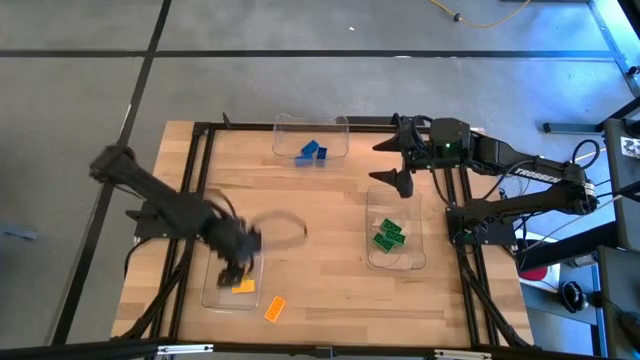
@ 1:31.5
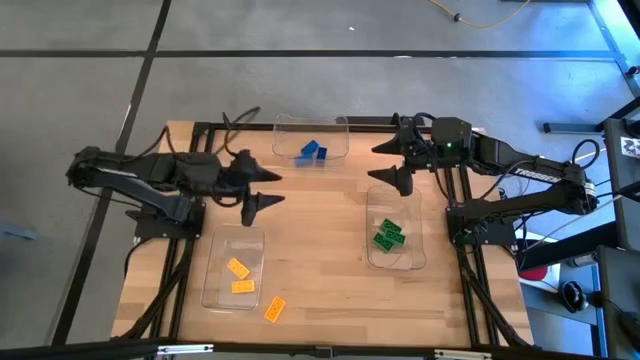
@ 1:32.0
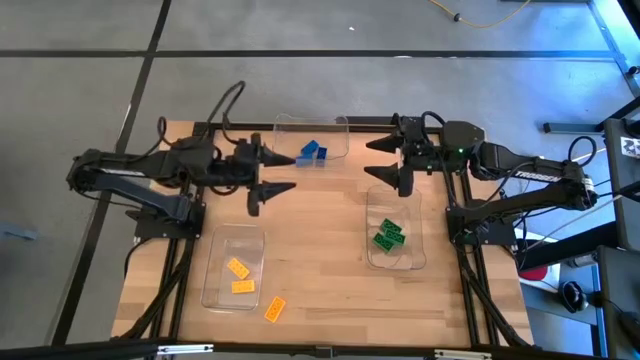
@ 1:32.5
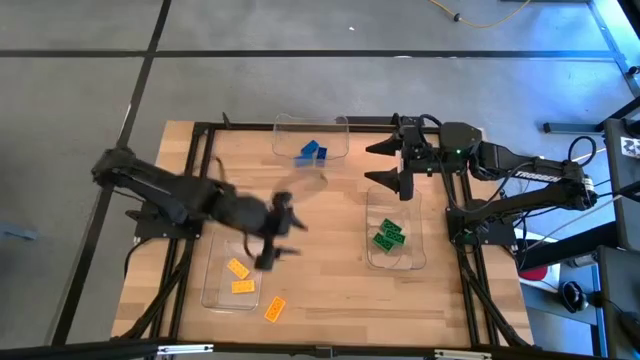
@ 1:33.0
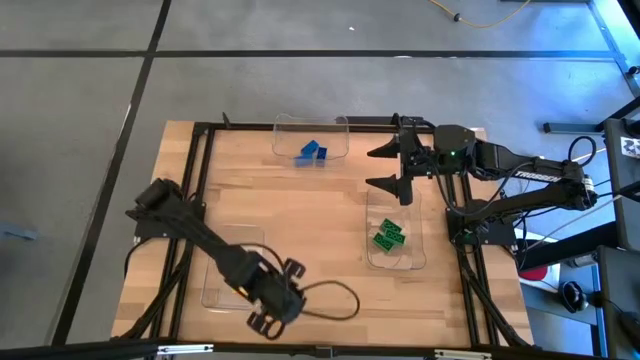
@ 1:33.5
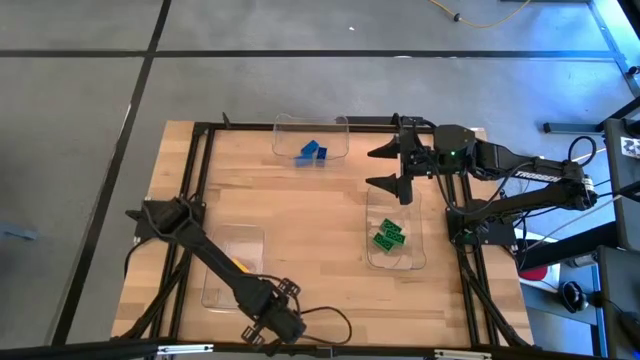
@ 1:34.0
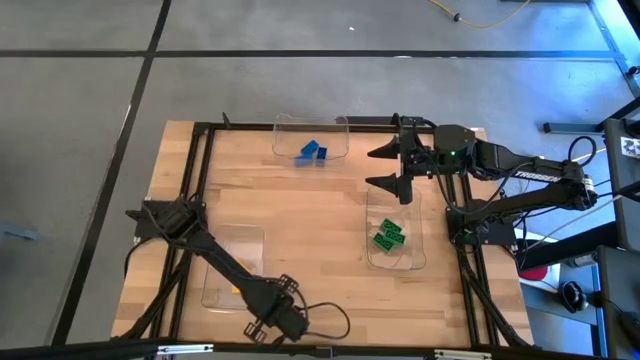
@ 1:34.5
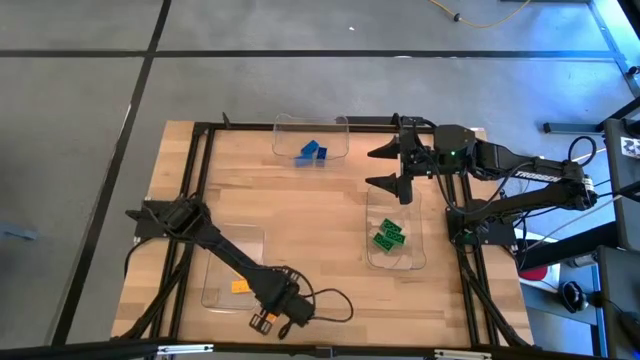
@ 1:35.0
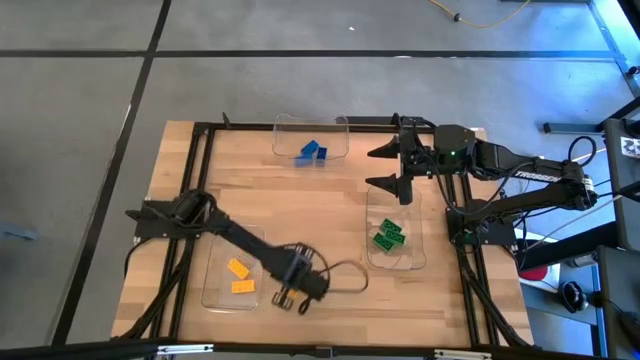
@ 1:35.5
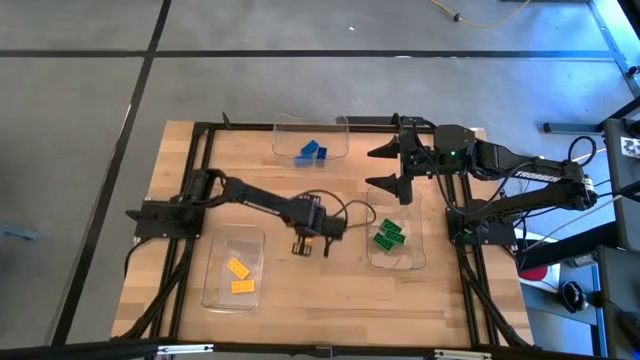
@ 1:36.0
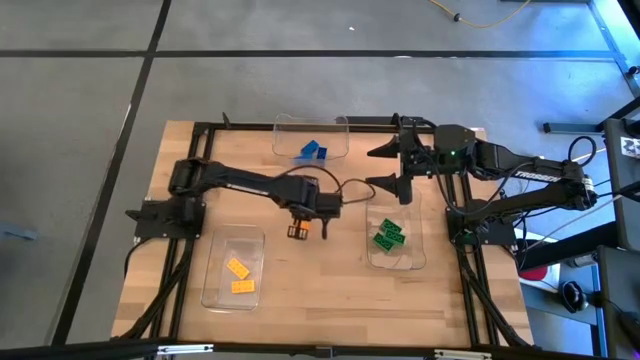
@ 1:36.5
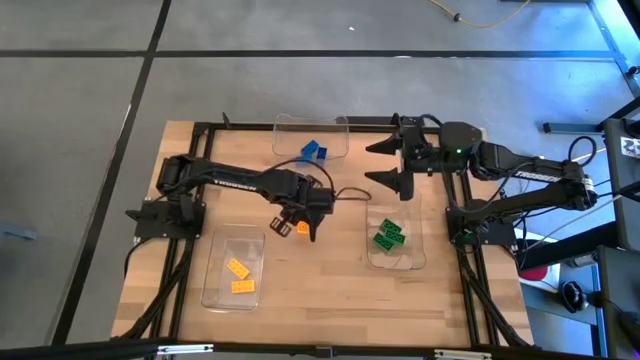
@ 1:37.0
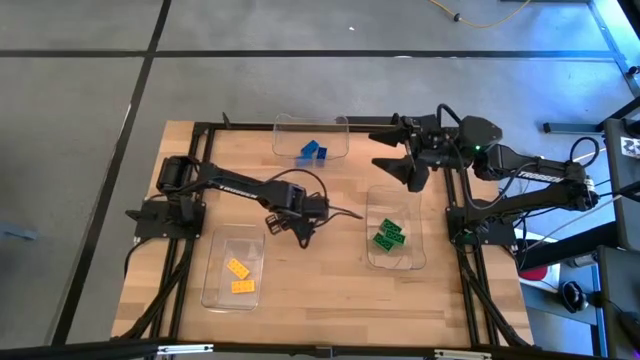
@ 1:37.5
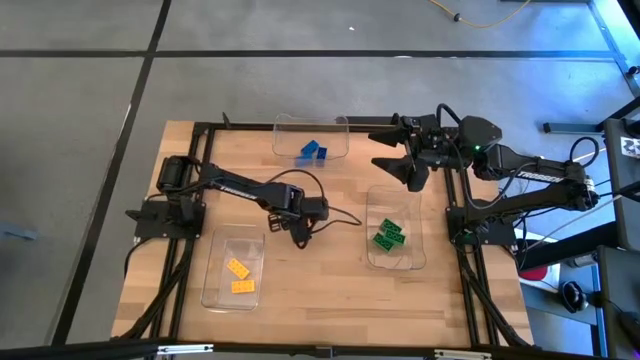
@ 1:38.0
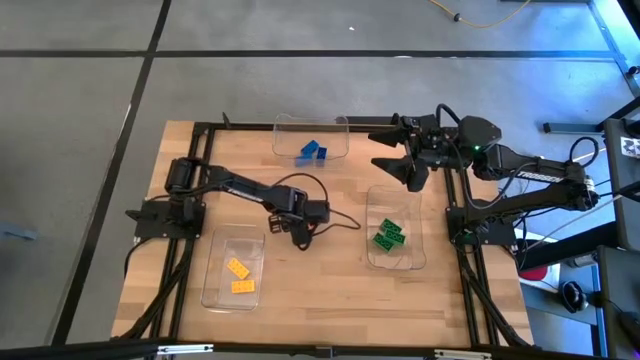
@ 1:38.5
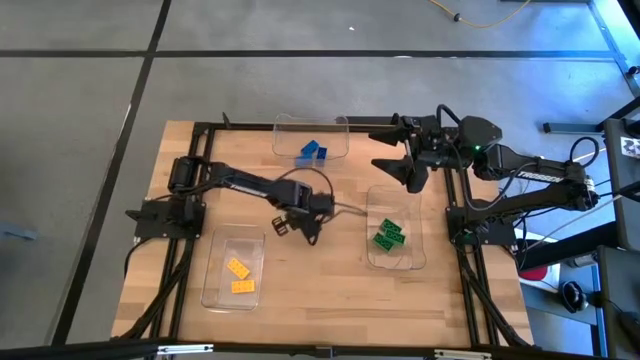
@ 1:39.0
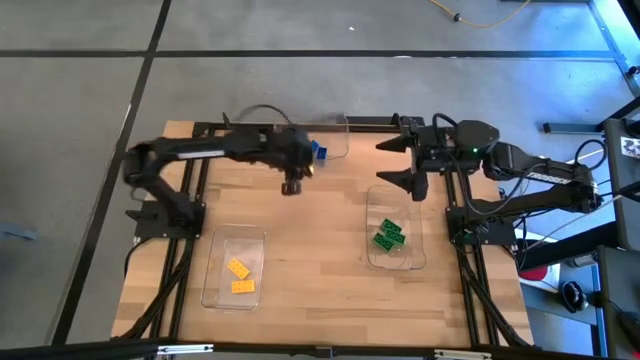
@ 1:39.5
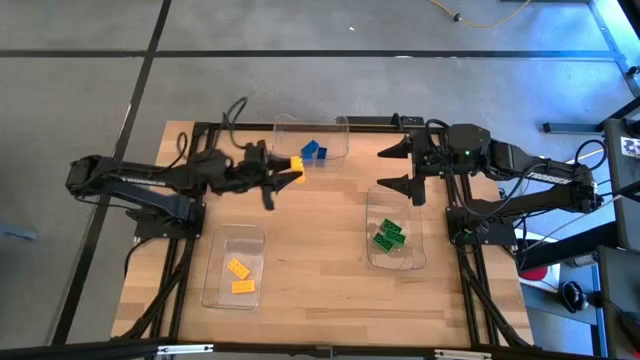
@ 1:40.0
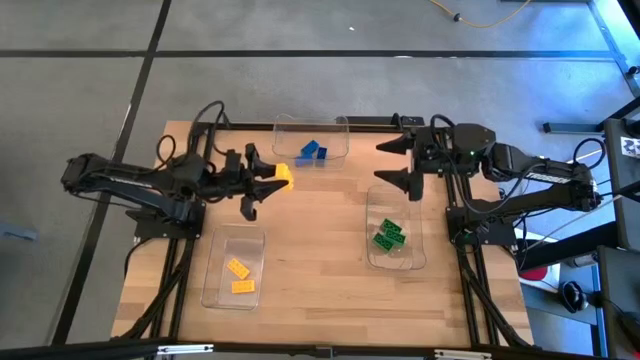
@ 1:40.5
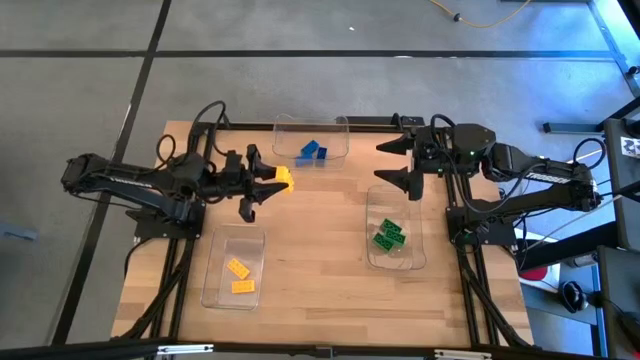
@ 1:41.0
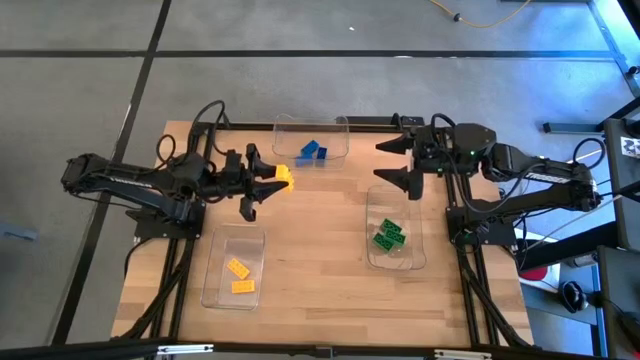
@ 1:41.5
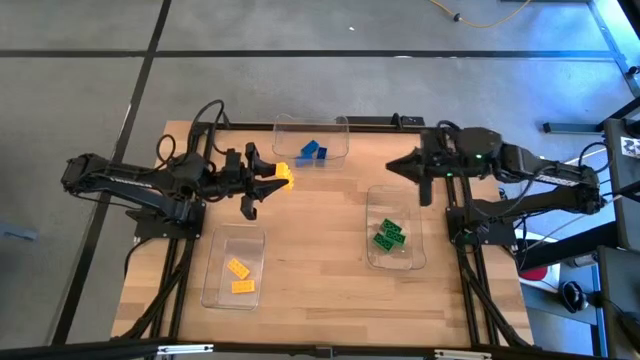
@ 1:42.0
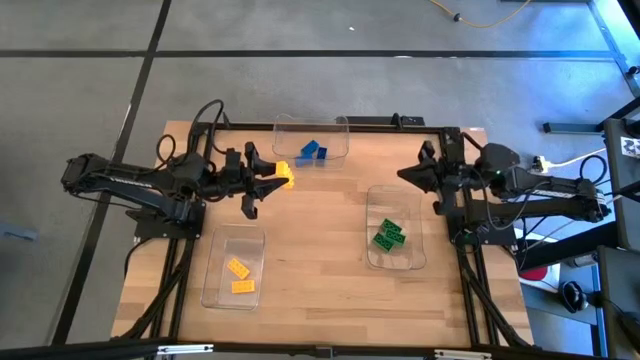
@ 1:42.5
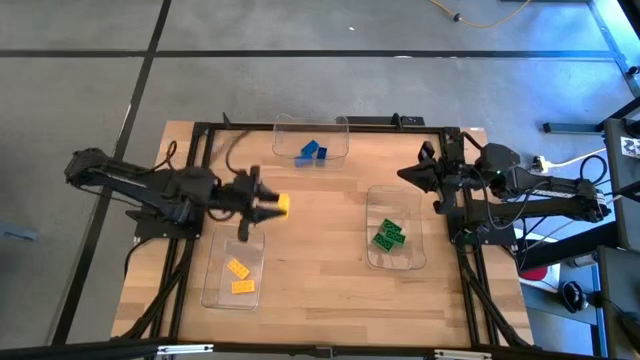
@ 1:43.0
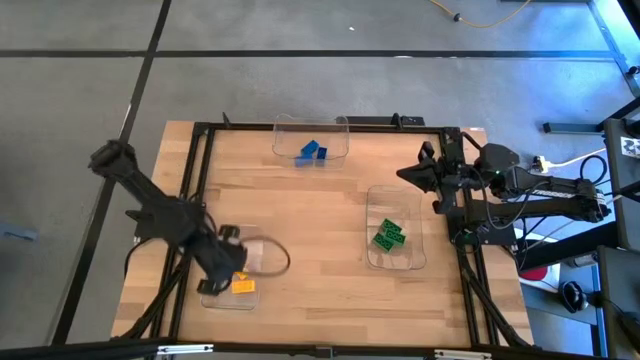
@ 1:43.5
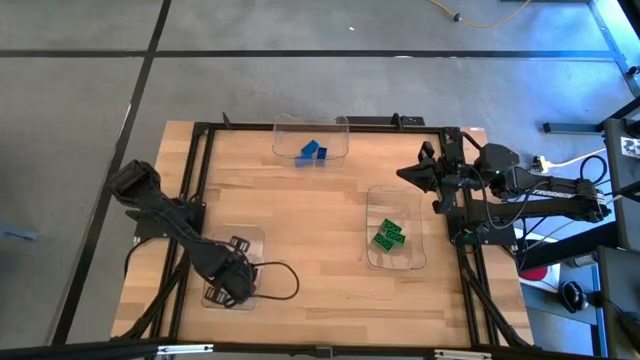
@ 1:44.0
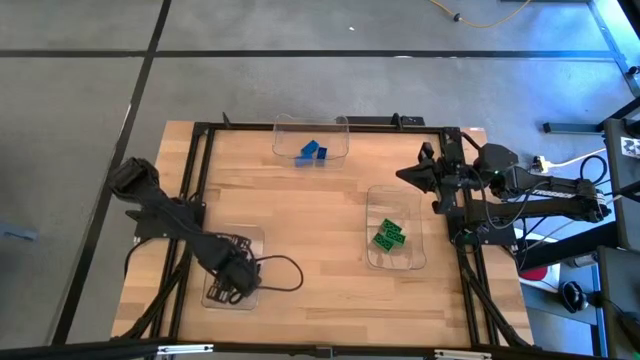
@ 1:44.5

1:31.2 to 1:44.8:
Task: Sort & place blocks by color
Put the yellow block into the bottom left transparent bin

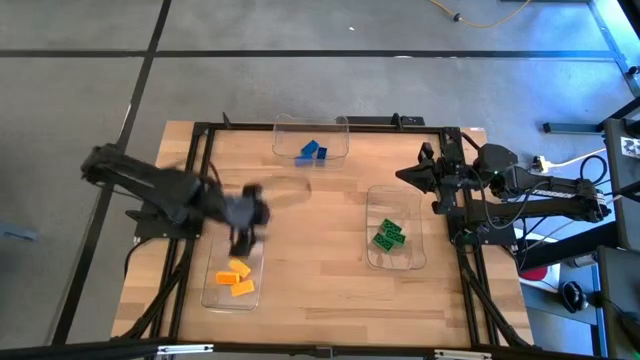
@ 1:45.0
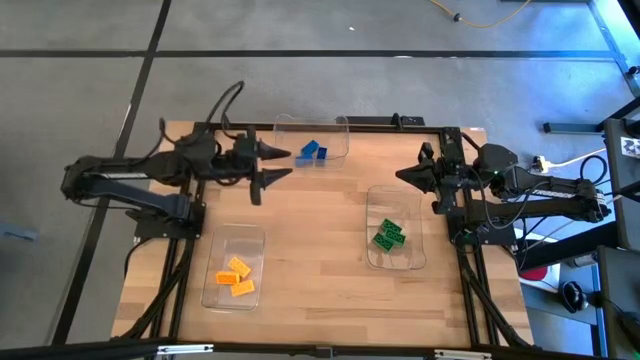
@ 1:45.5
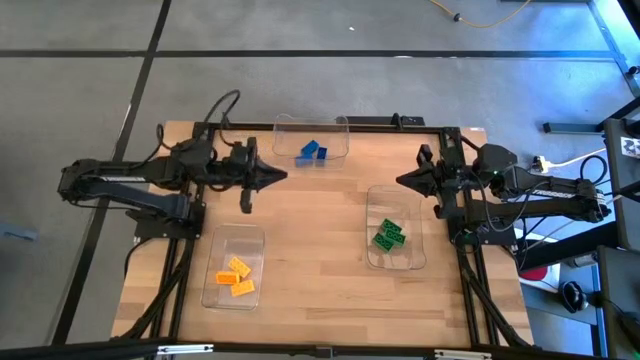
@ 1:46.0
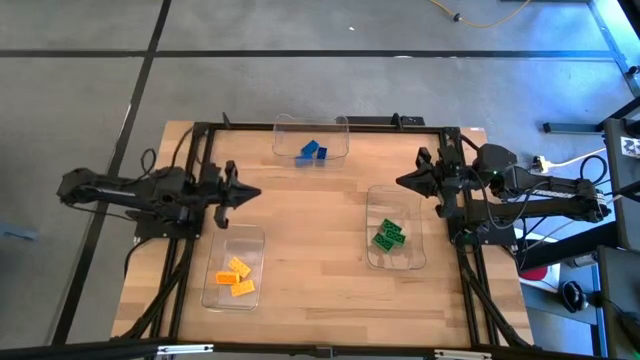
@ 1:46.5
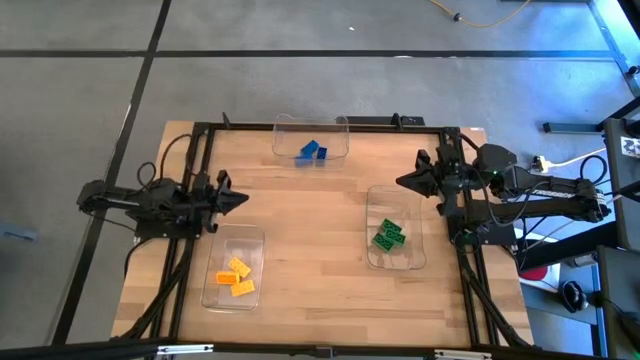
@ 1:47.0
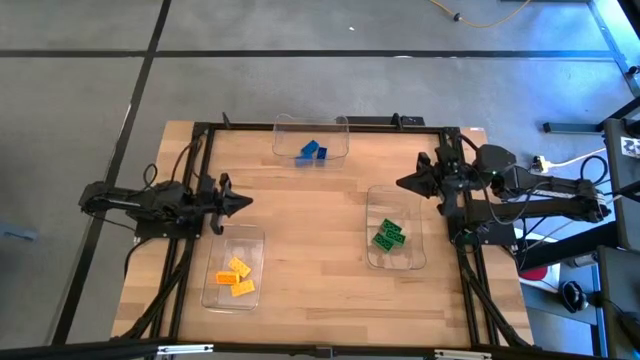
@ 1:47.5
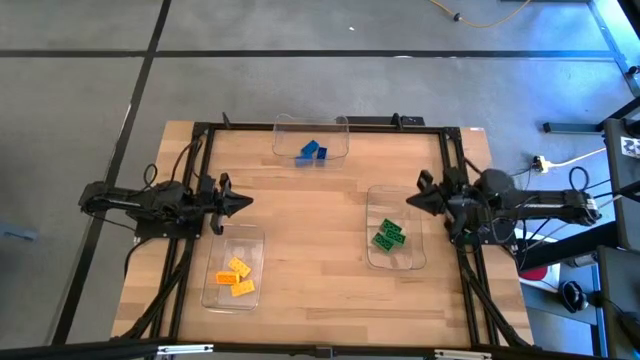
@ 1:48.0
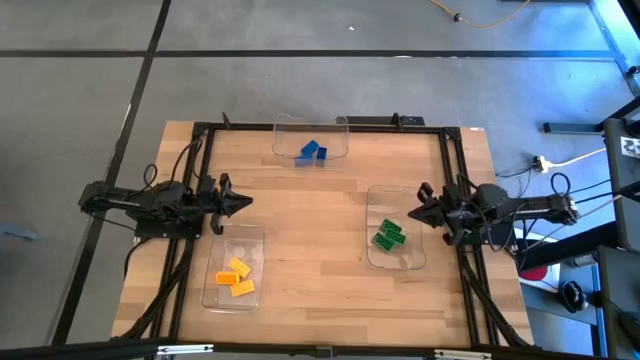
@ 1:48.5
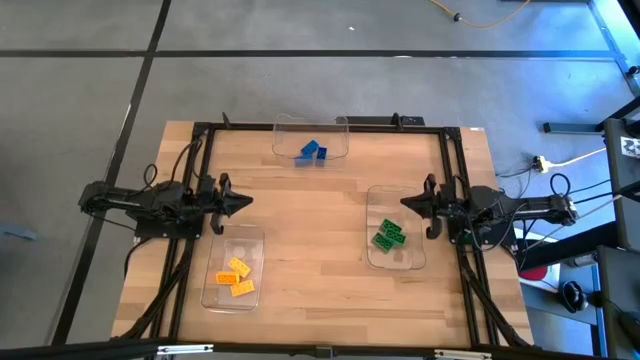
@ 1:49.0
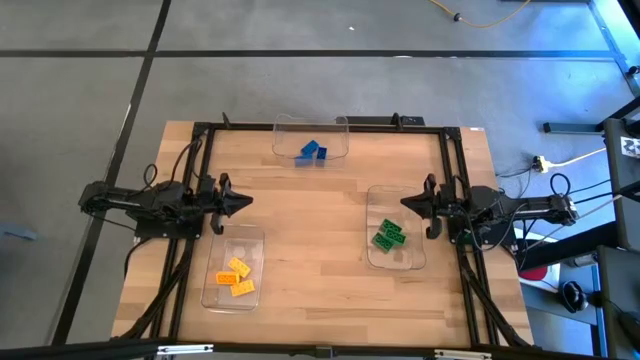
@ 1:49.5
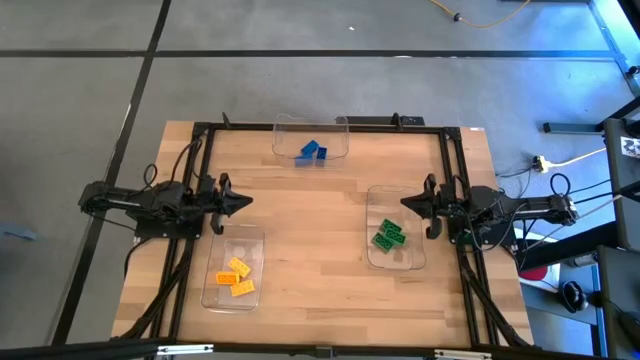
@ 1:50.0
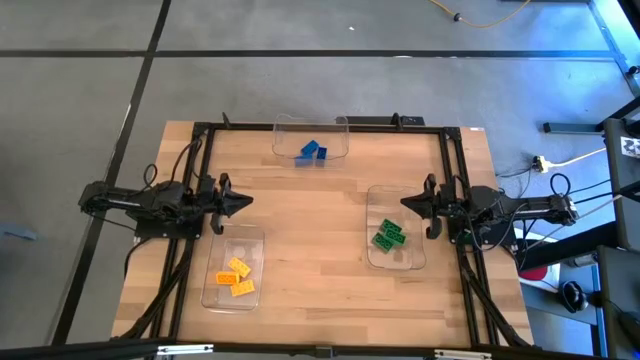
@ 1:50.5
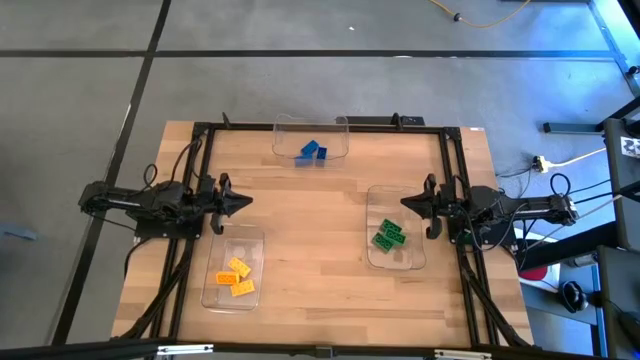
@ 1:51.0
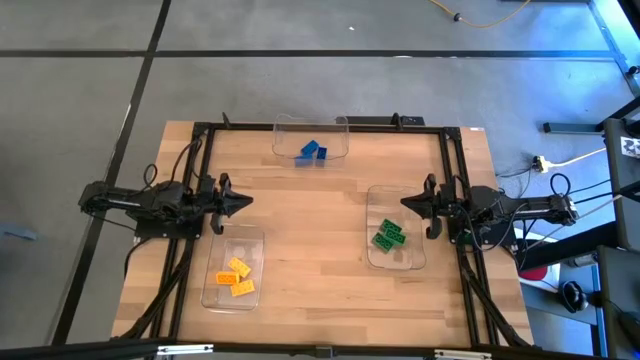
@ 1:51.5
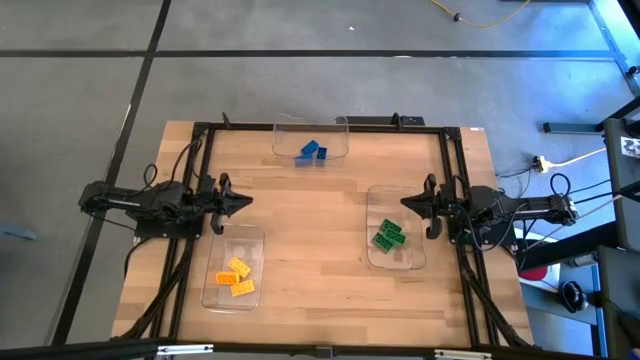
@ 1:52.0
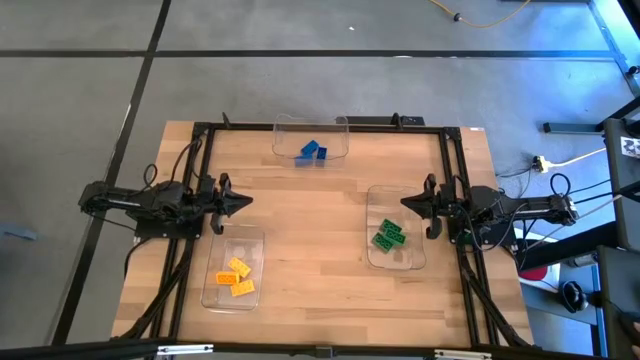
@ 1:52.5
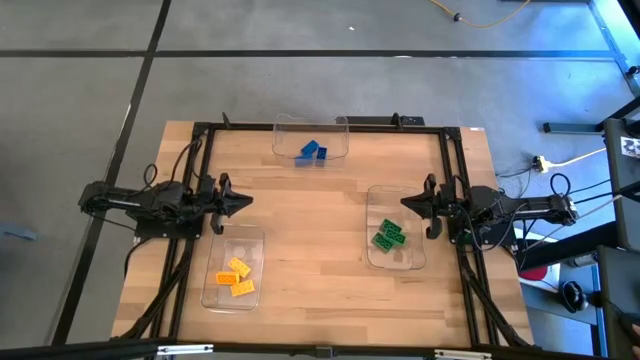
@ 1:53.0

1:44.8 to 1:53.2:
Return to Home Position
